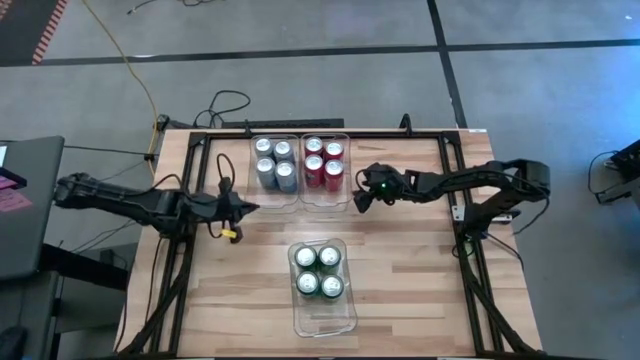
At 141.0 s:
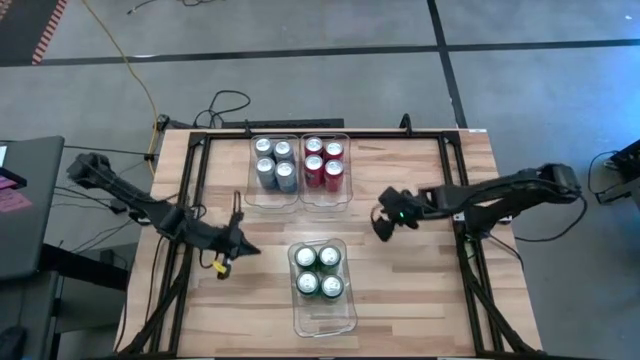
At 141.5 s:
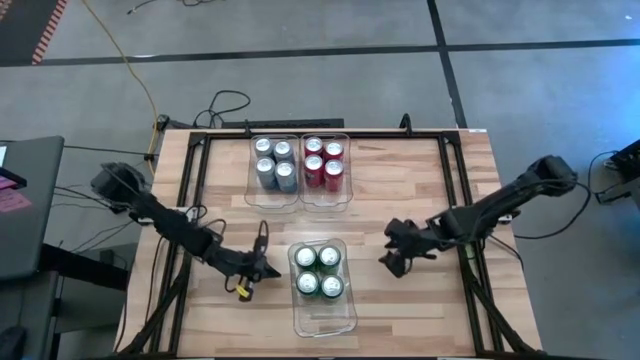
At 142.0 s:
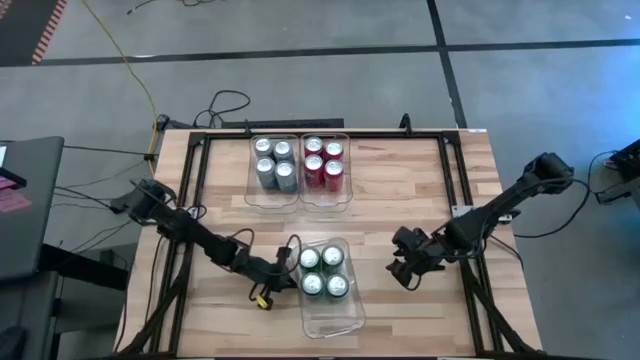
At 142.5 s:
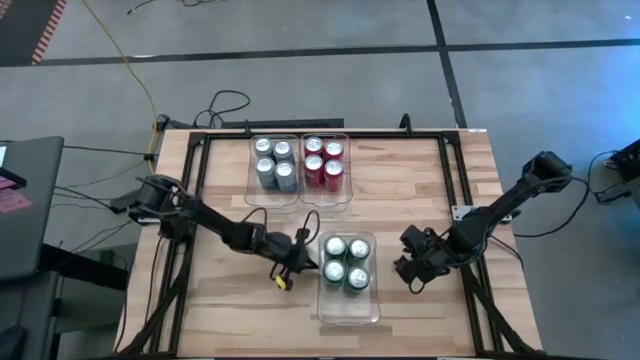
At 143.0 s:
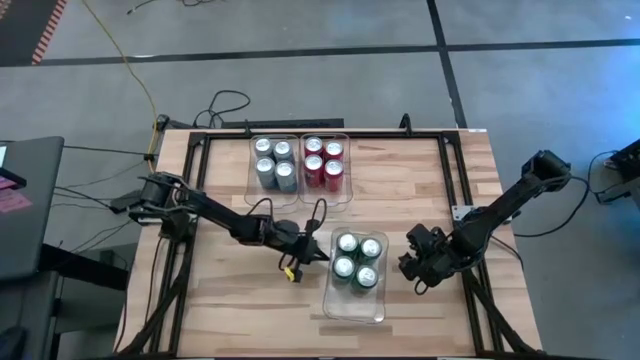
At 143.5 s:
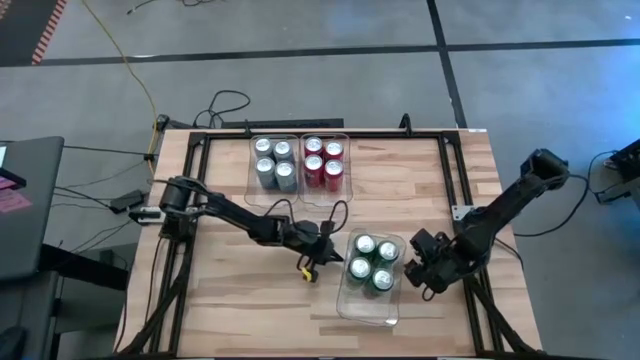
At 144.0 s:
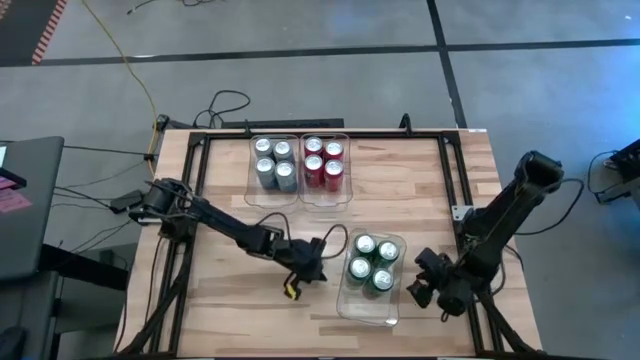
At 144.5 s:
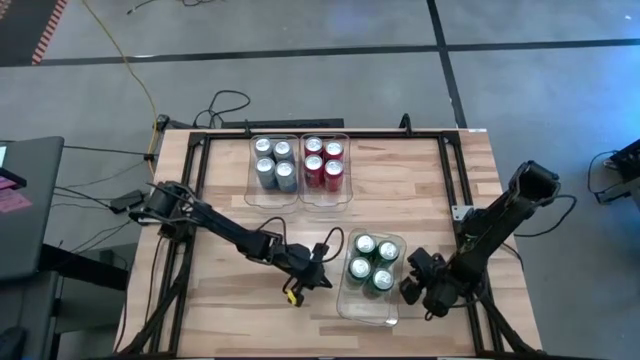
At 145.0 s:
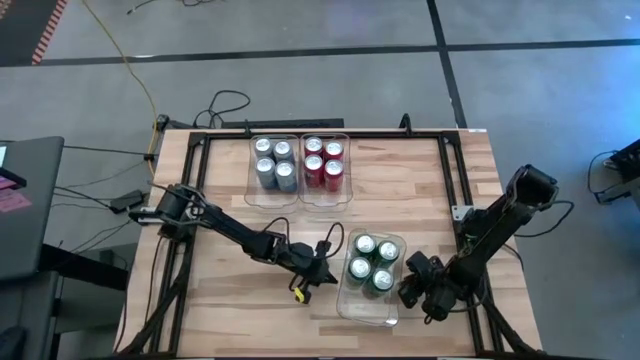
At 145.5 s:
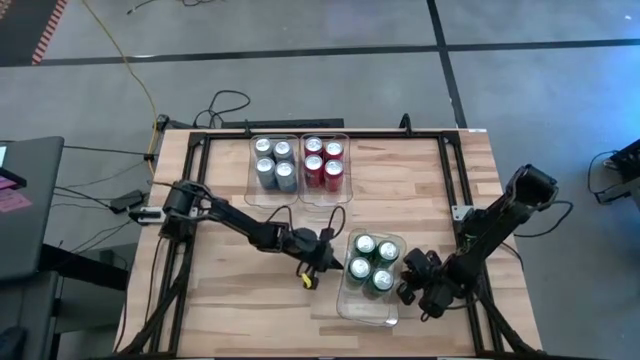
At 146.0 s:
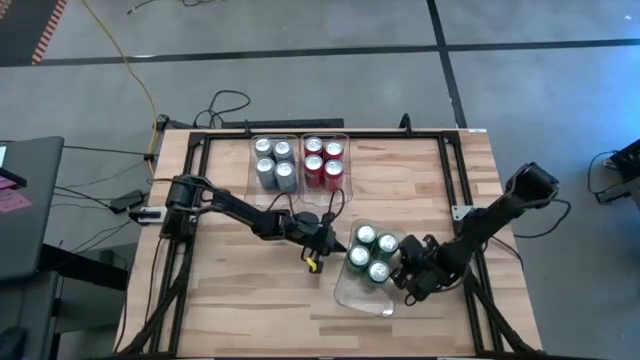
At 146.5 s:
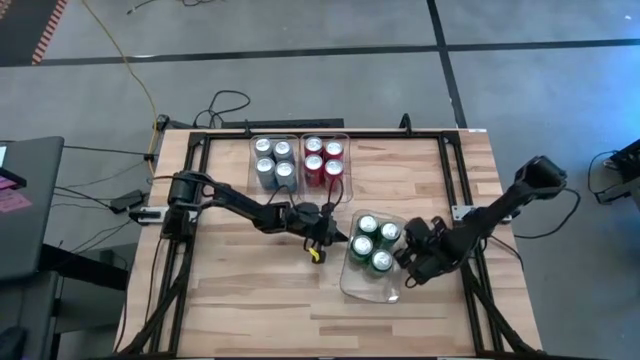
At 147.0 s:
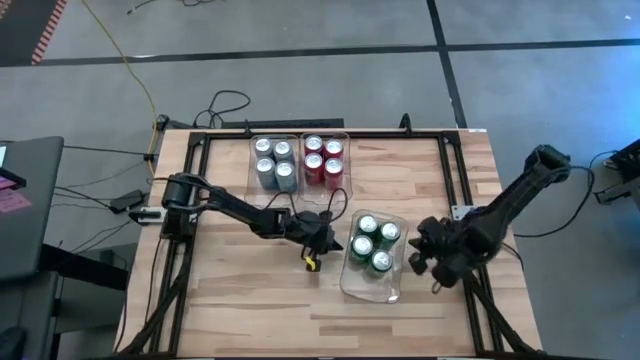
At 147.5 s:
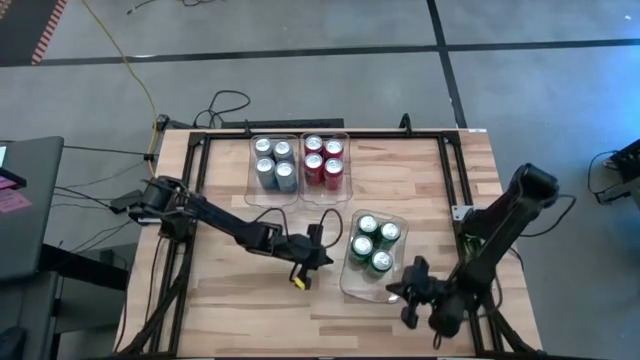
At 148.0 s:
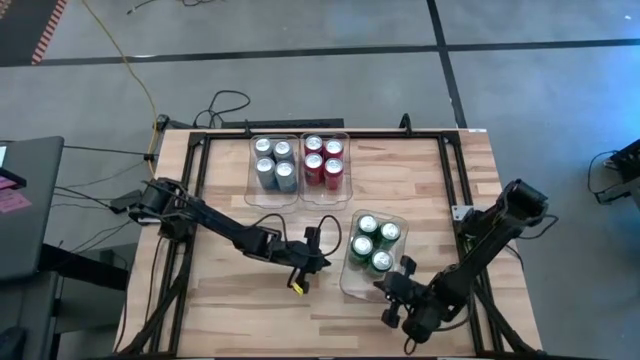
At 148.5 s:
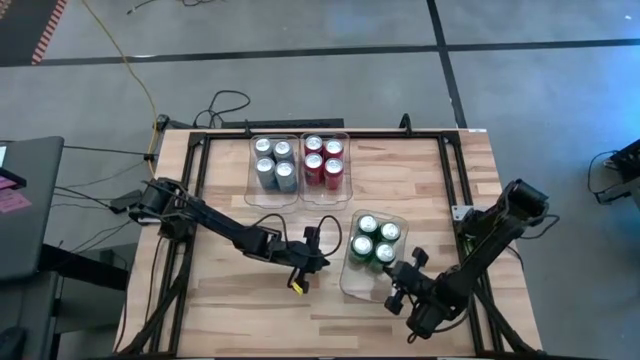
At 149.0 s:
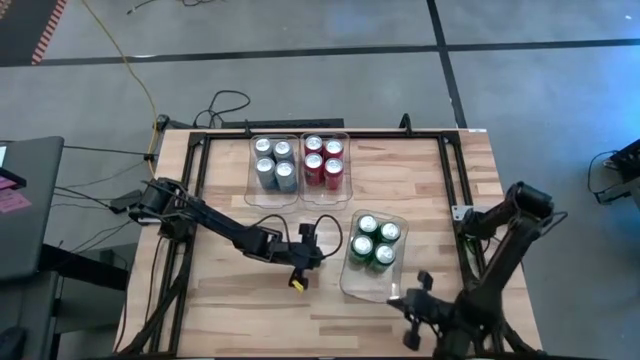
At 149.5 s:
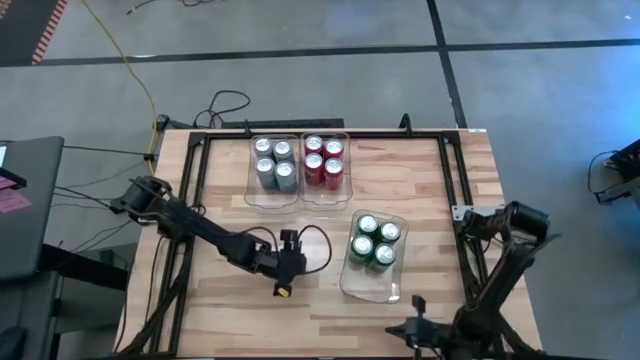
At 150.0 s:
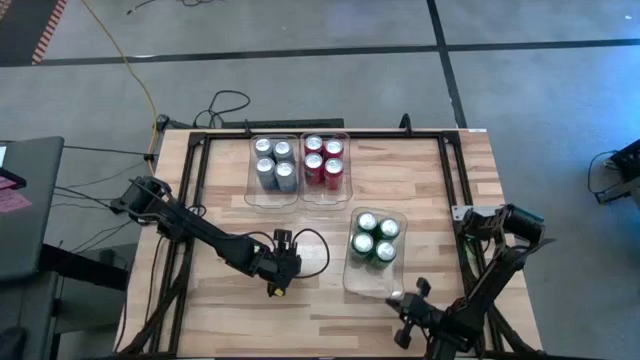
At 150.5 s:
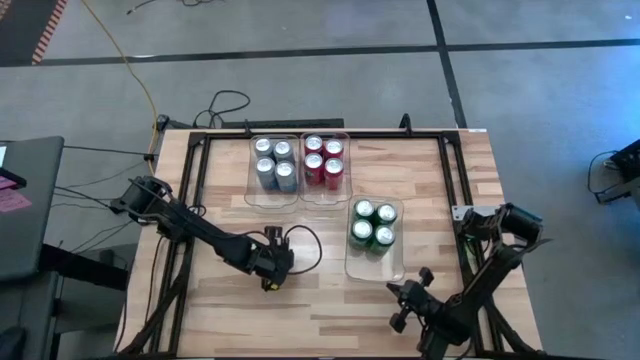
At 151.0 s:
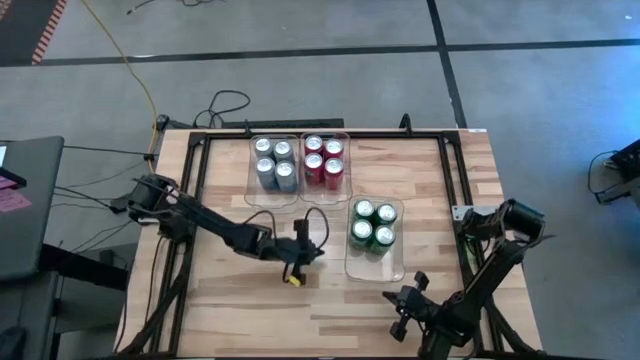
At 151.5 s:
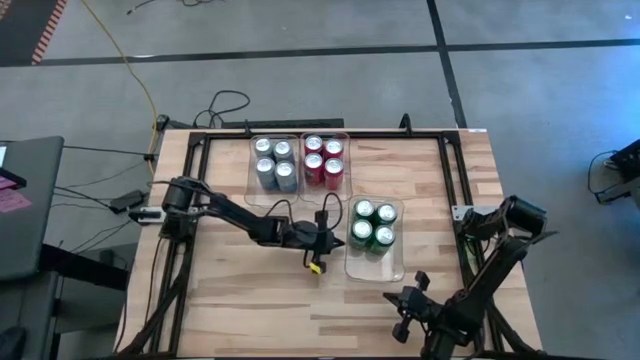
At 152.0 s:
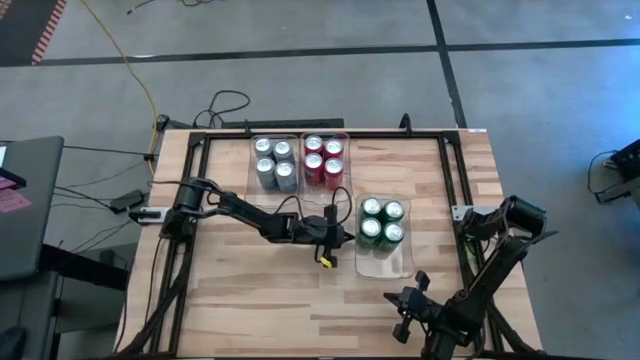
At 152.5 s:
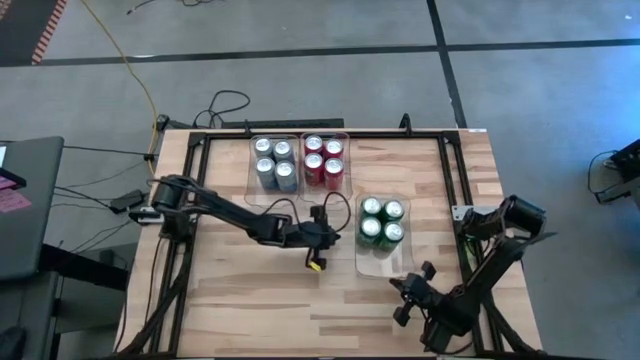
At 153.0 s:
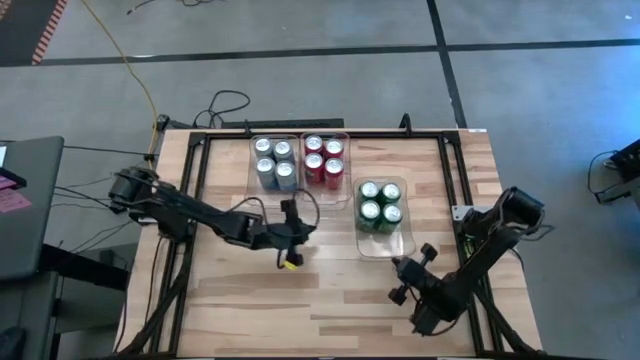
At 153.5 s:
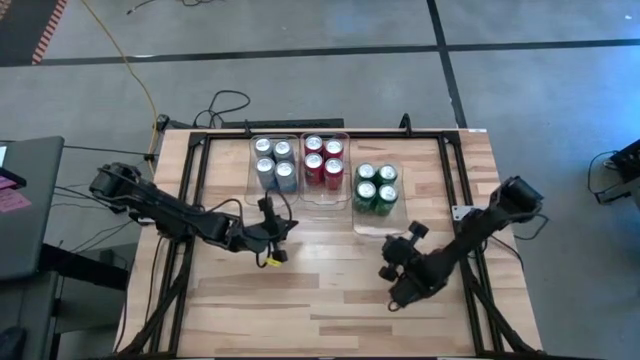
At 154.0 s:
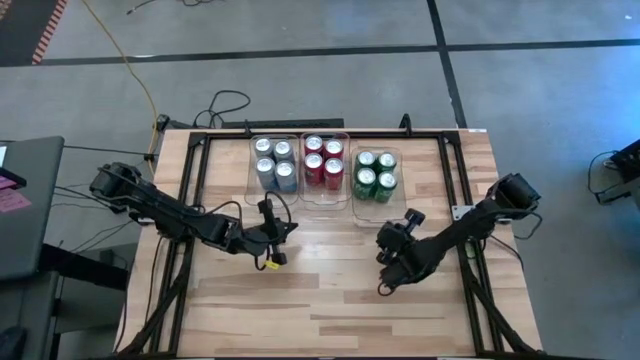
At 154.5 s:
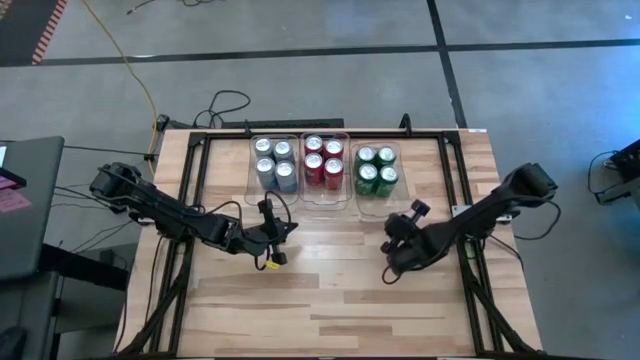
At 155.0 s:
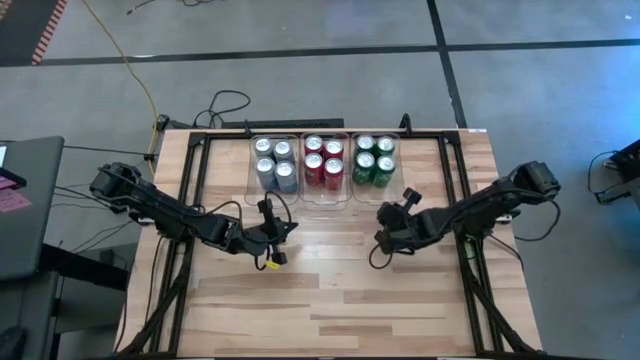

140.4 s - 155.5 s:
Task: Sort soda cans
Move the bottom transparent bin to the top right of the table

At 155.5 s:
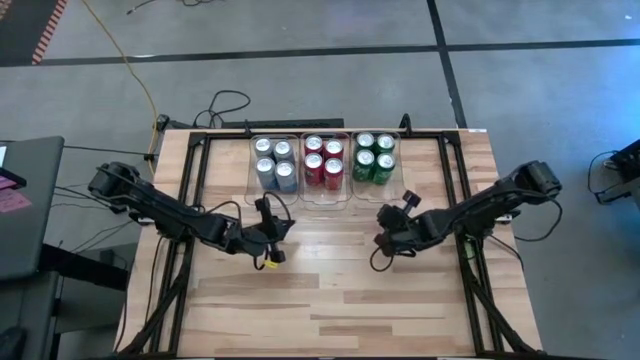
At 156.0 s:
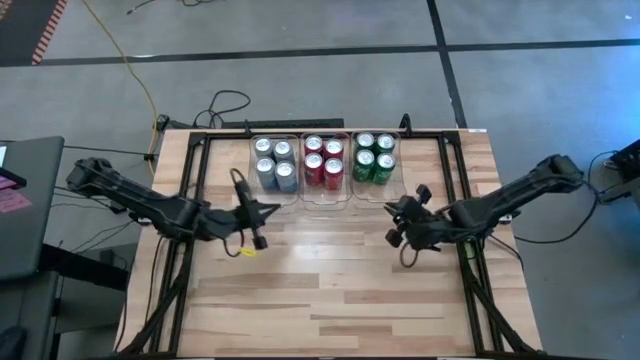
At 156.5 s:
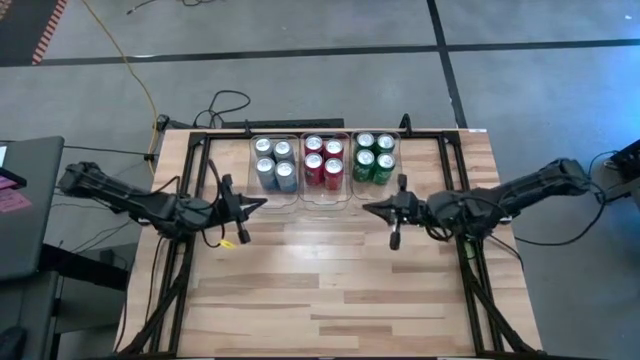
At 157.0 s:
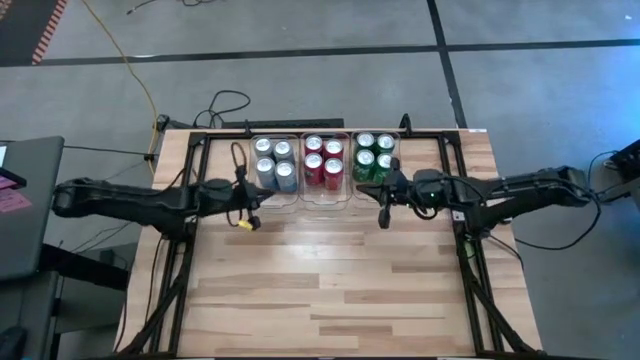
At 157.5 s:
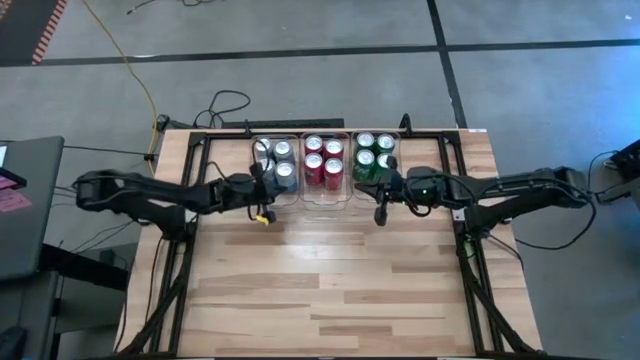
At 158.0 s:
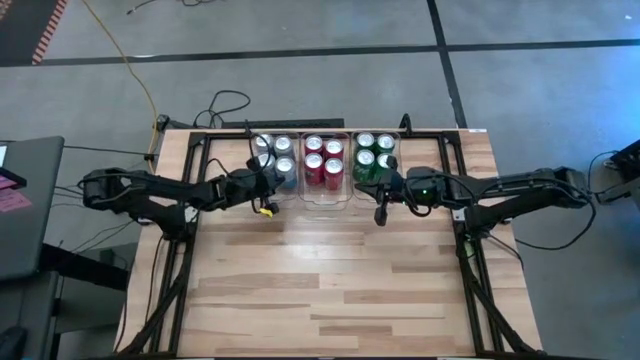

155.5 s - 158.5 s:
Adjust the white and blue soda cans
